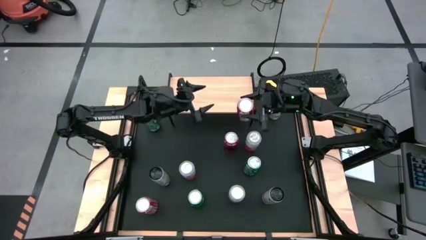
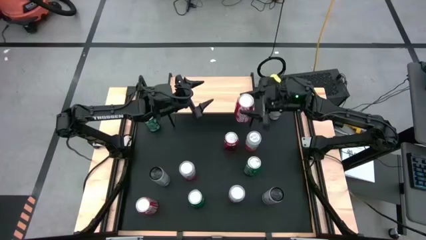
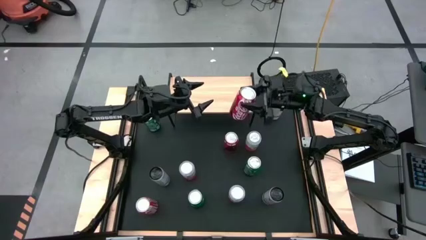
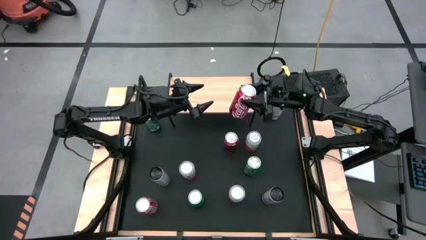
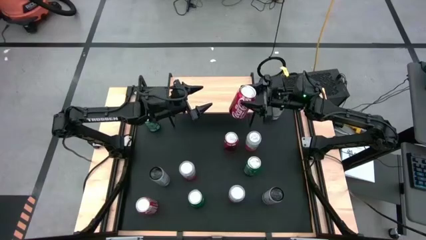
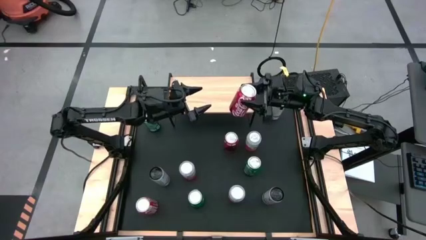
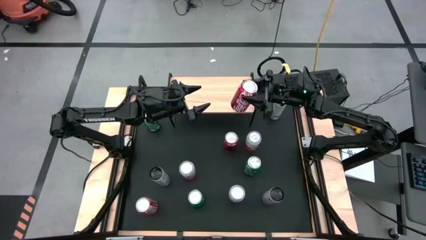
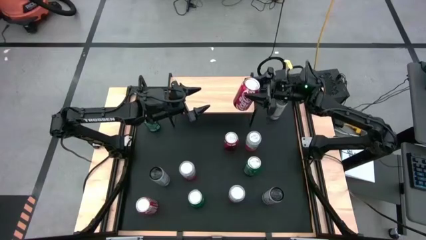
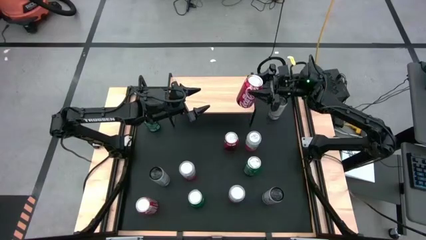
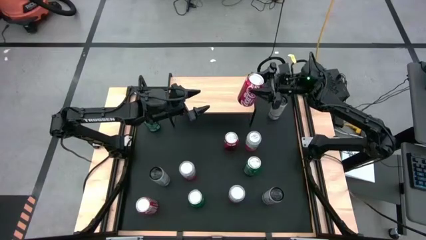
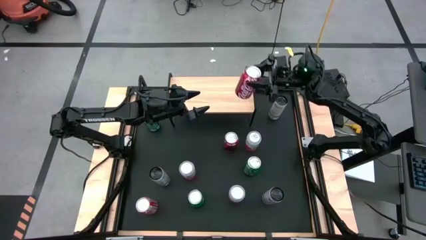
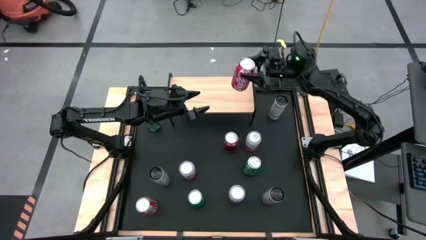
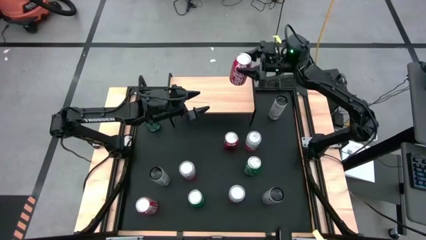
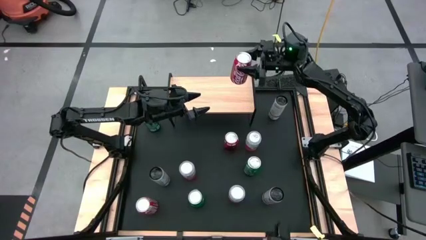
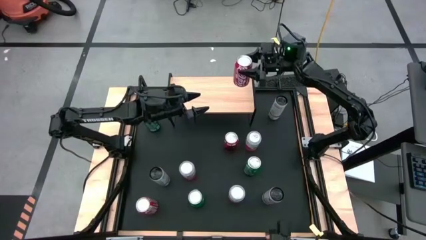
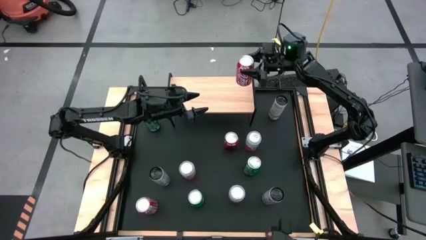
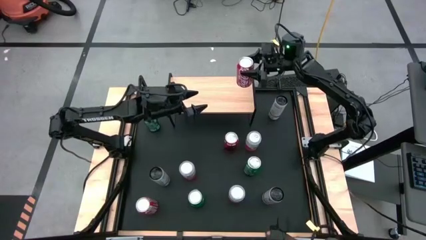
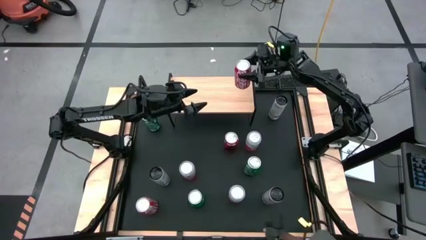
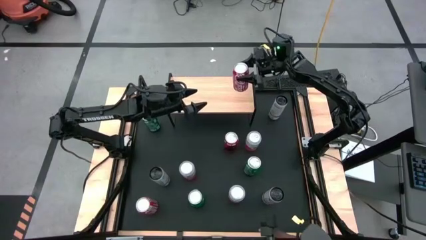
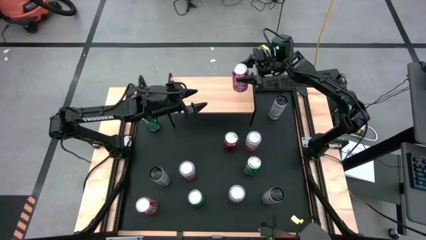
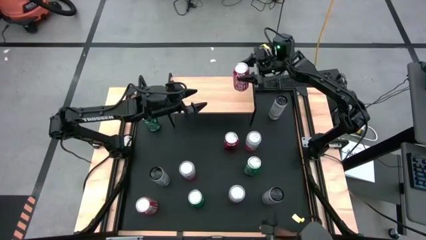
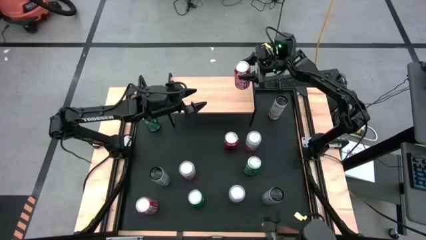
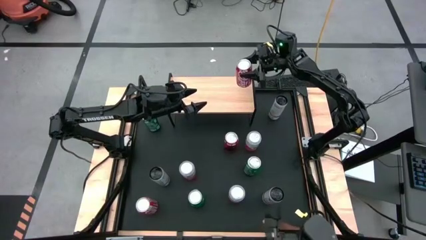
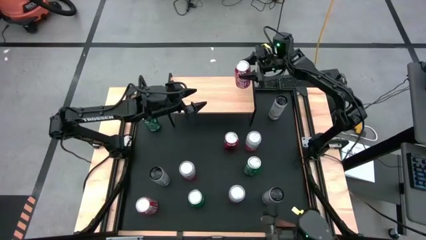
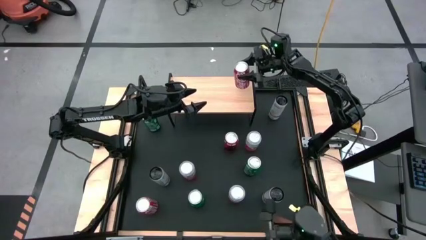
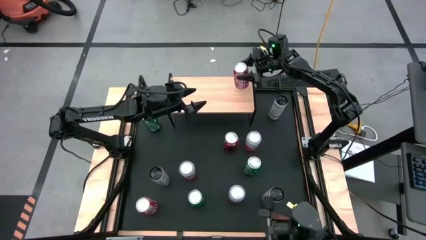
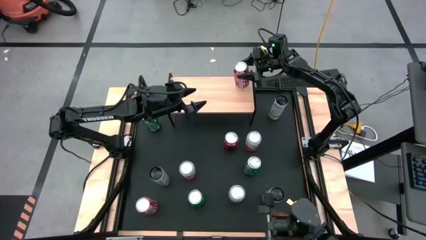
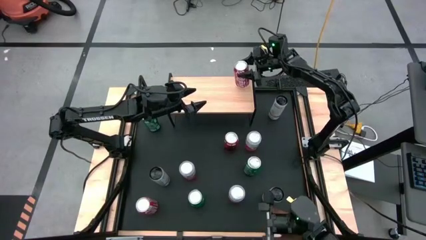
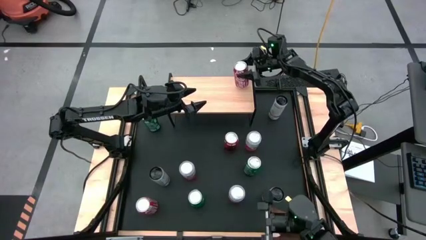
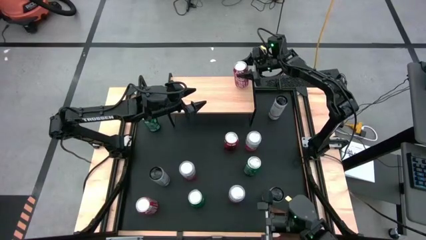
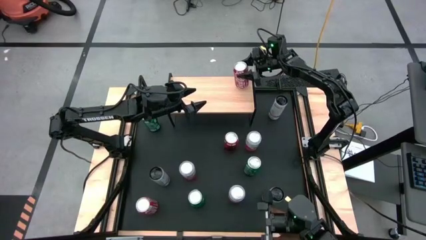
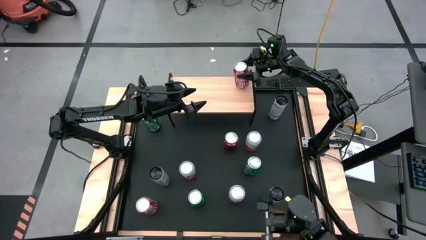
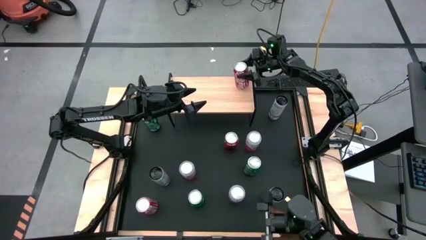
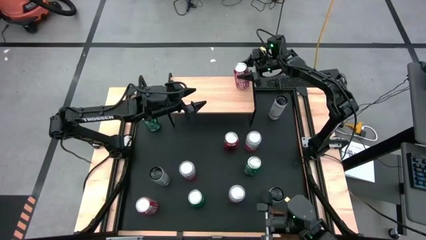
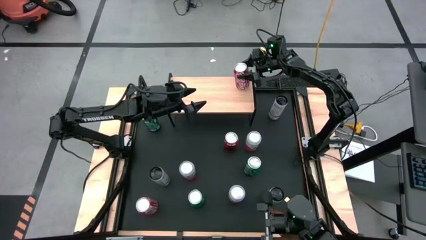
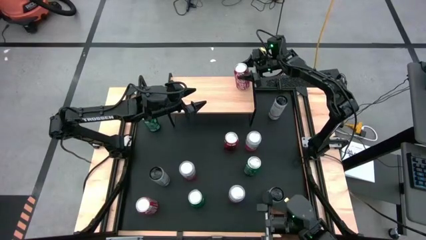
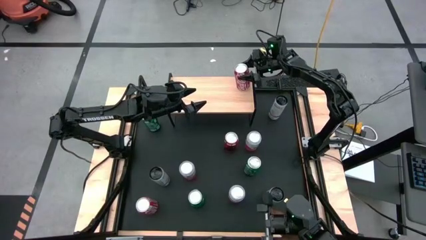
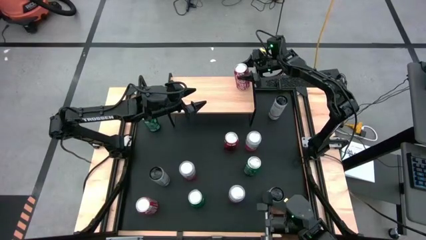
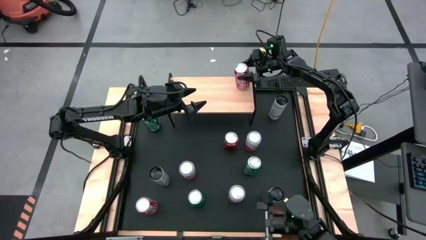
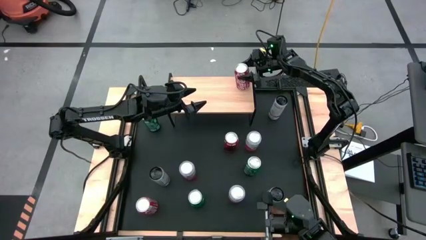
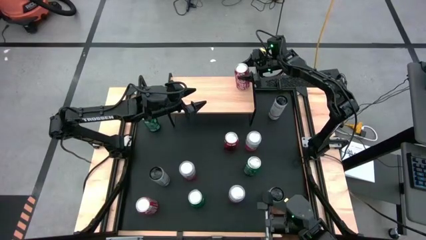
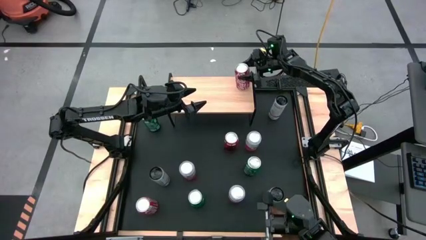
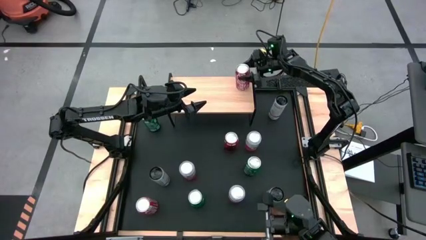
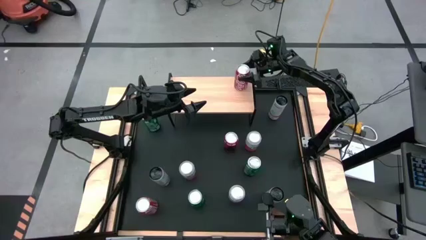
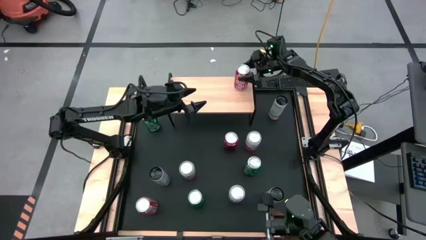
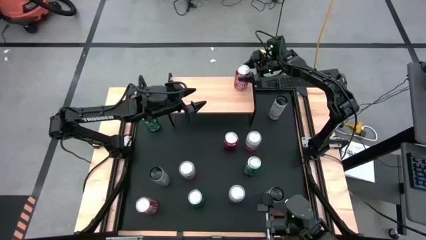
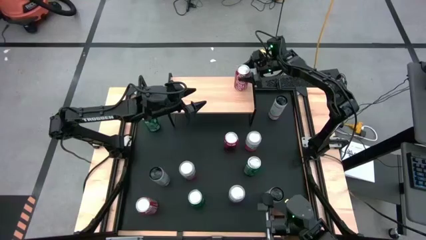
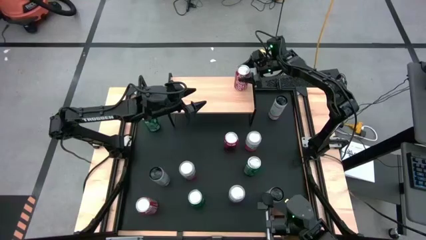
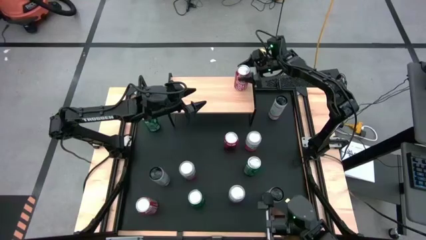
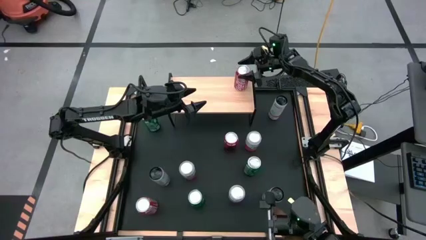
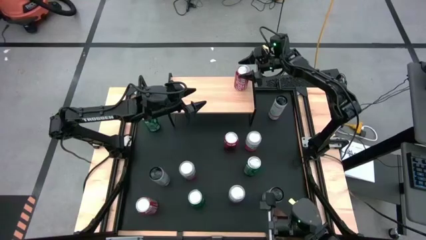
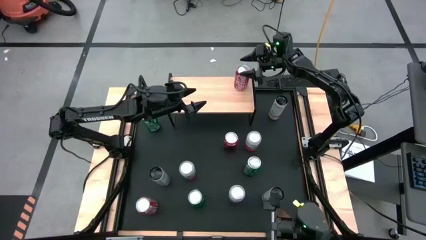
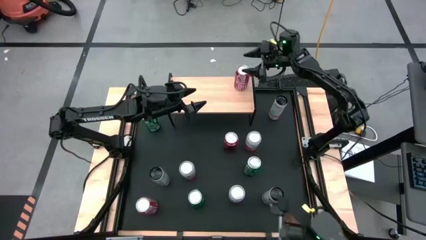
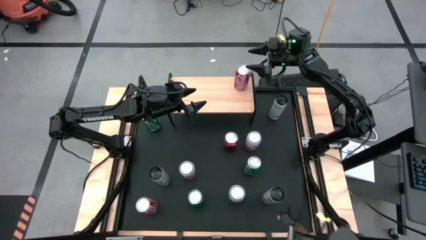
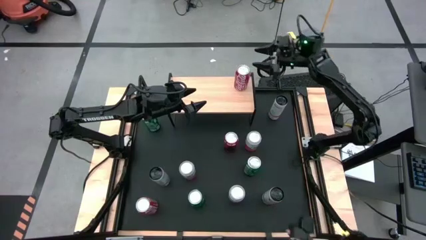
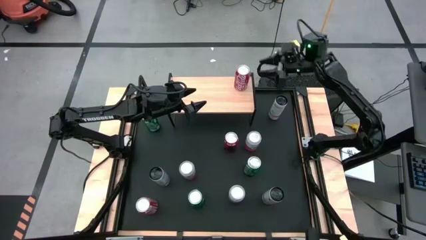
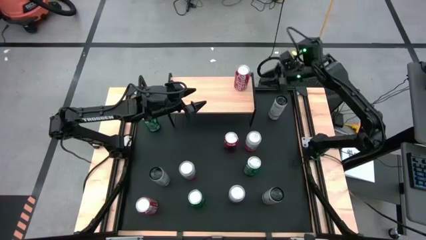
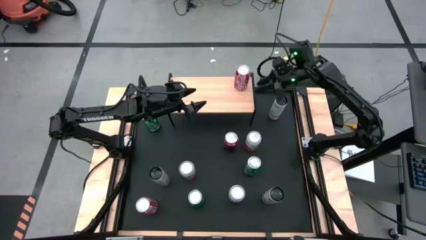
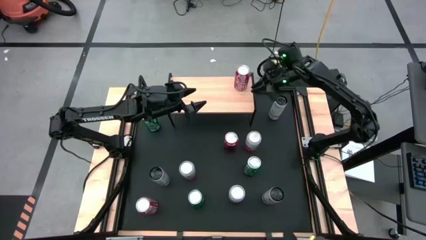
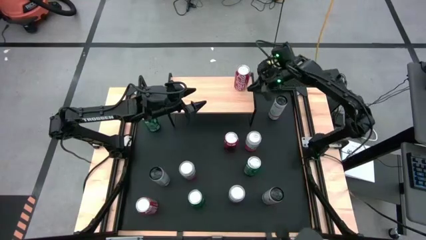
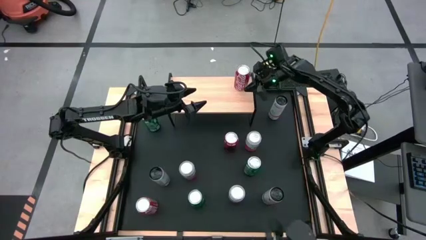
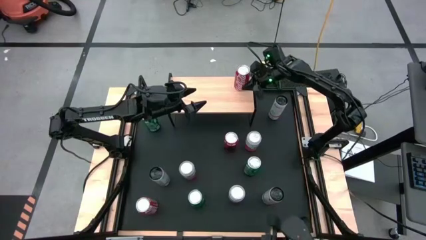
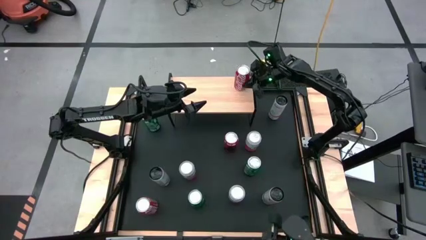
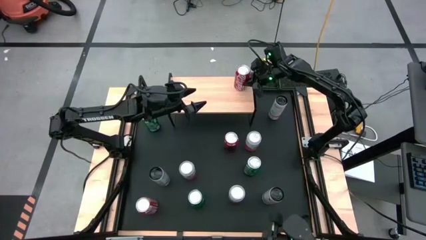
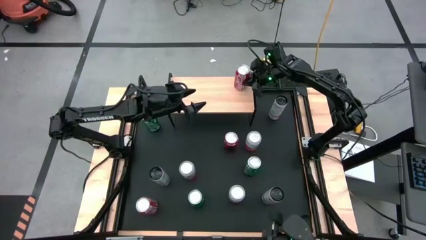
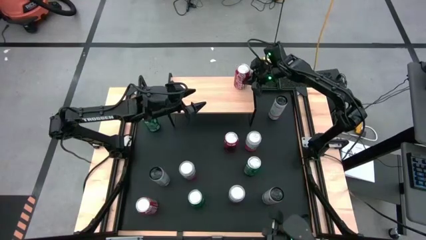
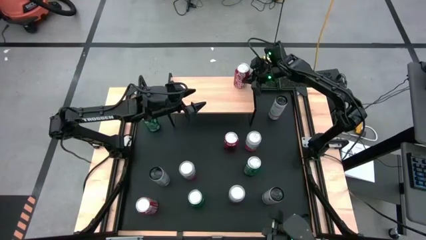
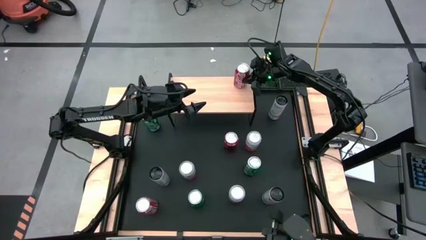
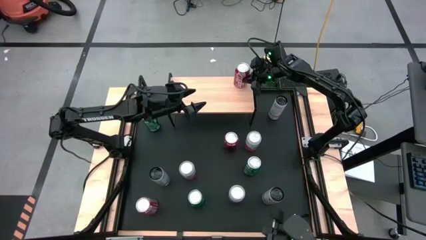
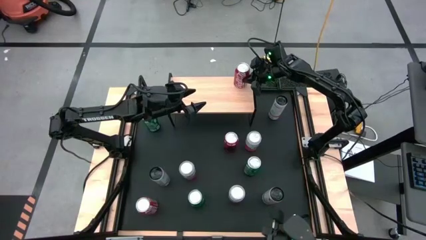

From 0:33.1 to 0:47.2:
Task: Place canned beverage on shelf
Put the top left red soda on the shelf
